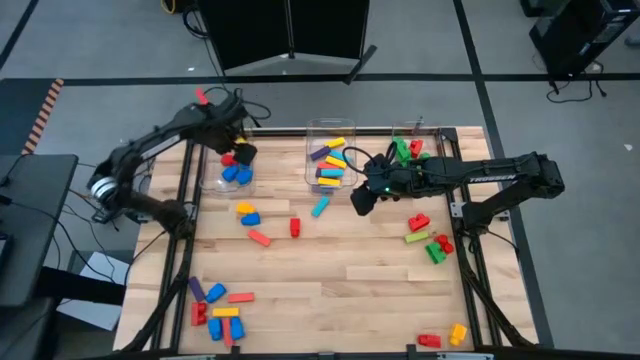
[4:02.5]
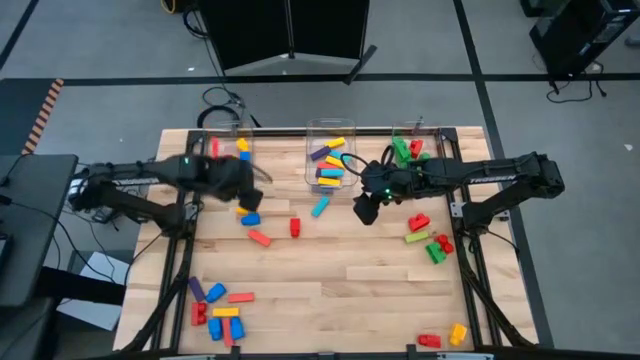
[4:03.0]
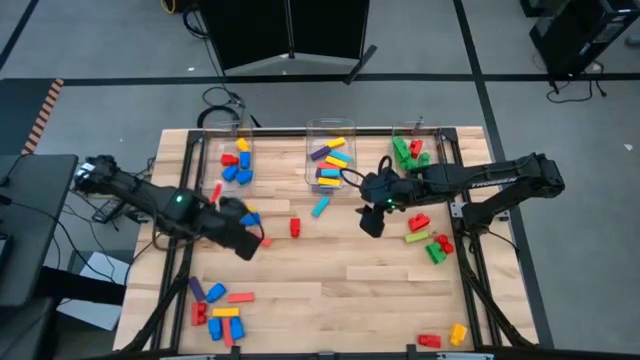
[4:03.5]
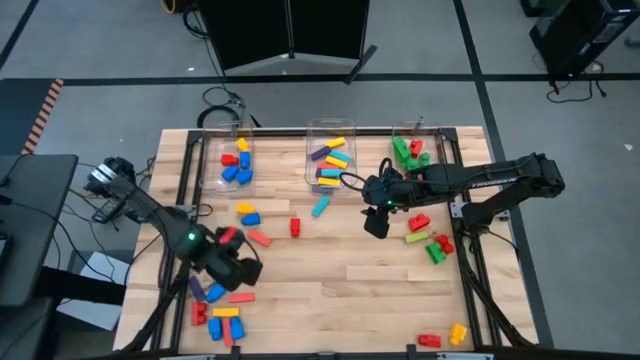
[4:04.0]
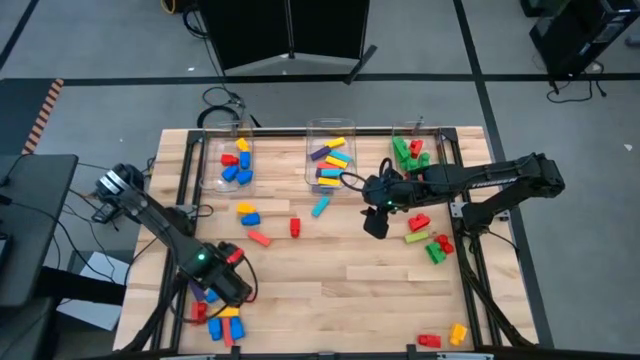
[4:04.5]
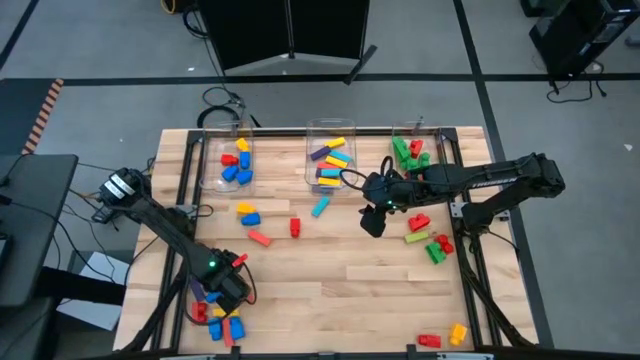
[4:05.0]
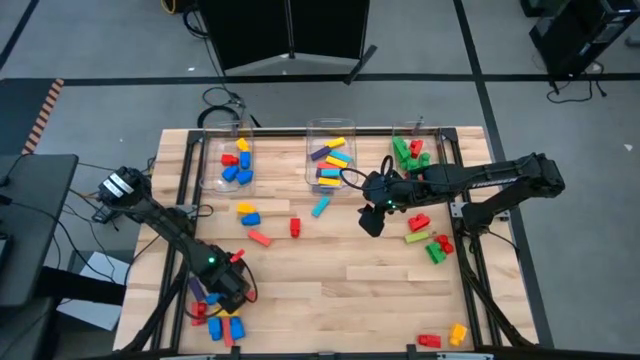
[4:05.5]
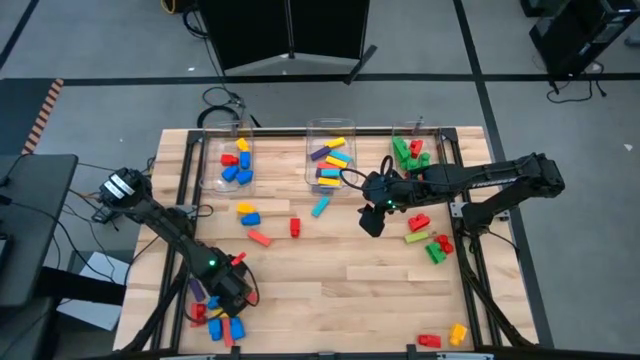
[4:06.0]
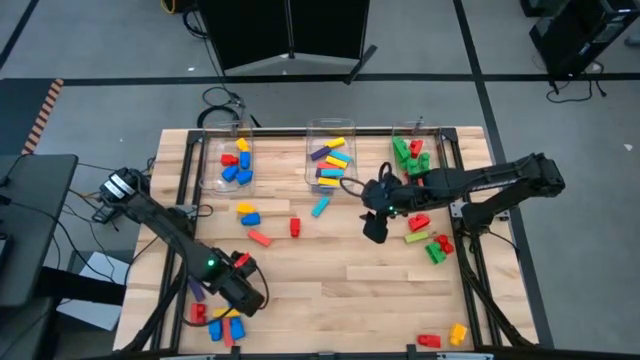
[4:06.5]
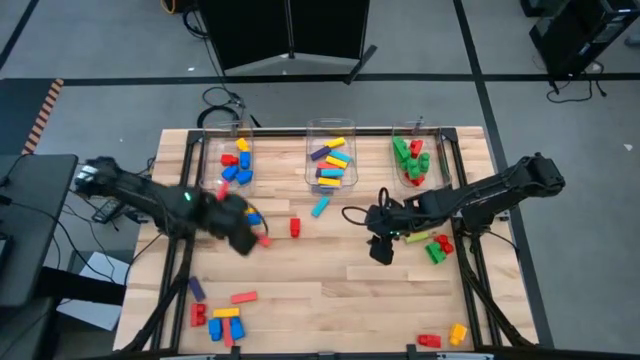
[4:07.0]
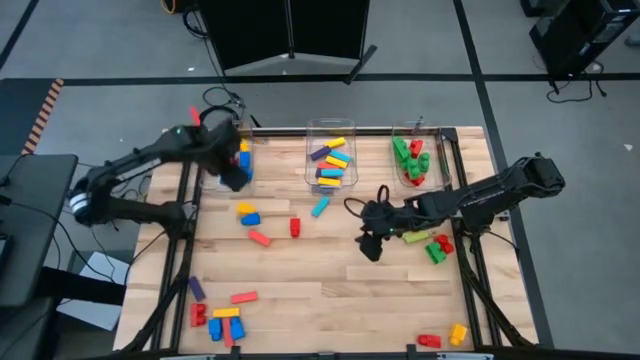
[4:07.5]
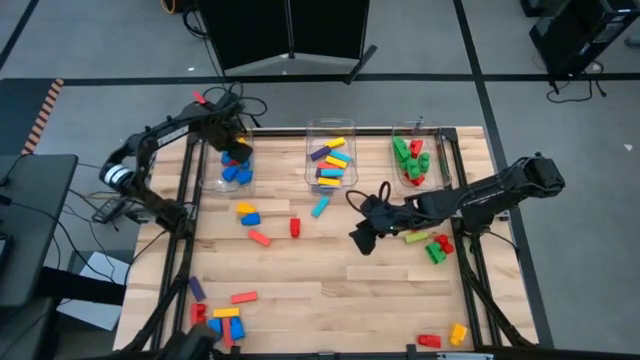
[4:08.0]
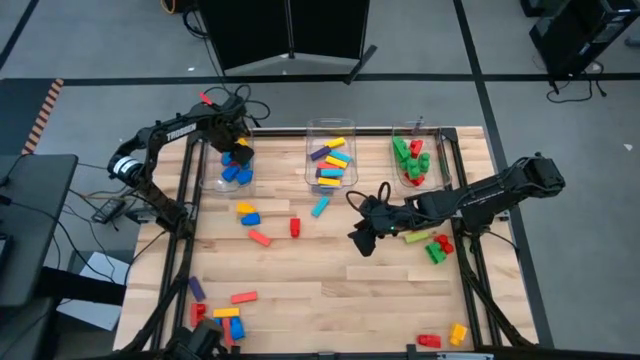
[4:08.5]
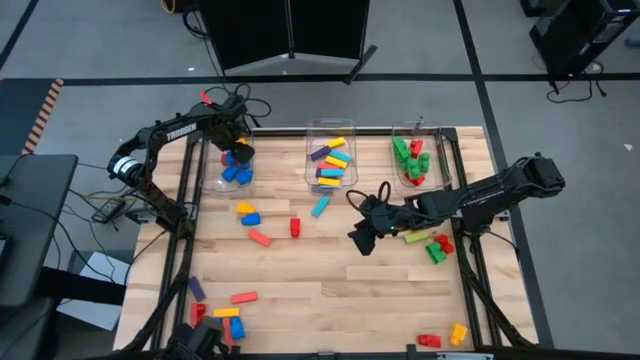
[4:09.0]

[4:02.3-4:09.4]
Task: Sort blocks by size
Put the blue 1 stud game piece into the left transparent bin

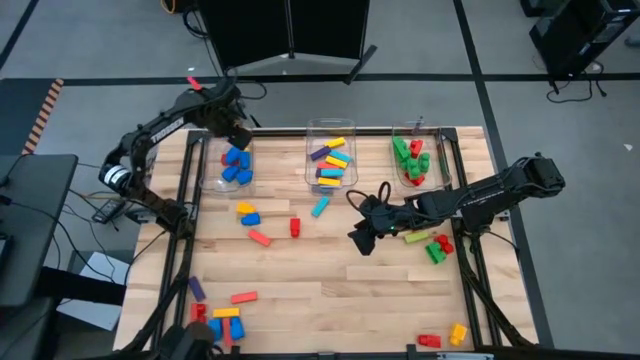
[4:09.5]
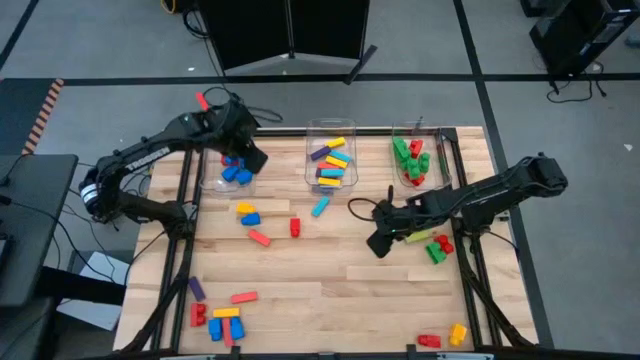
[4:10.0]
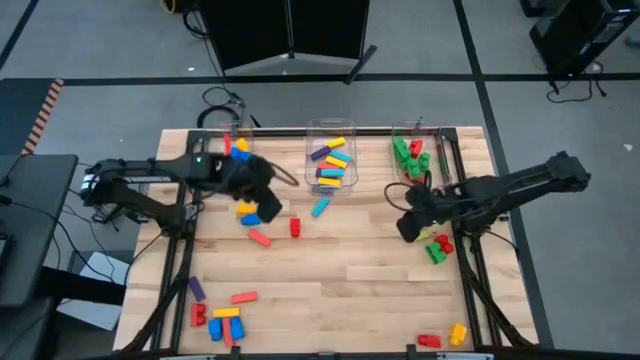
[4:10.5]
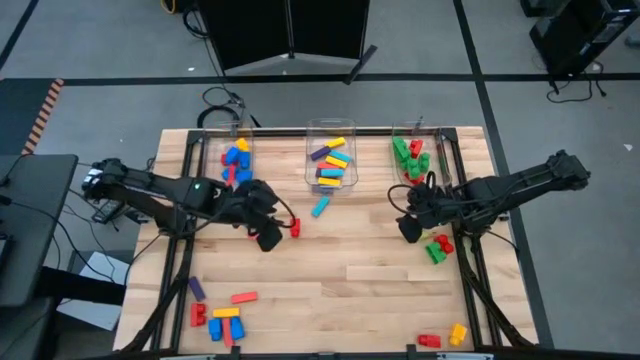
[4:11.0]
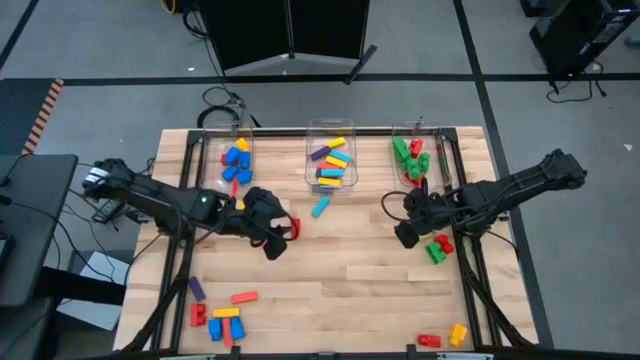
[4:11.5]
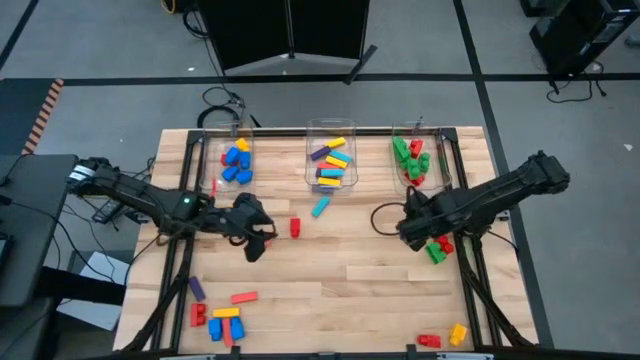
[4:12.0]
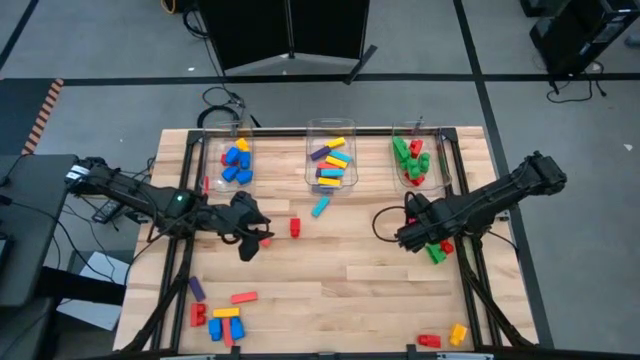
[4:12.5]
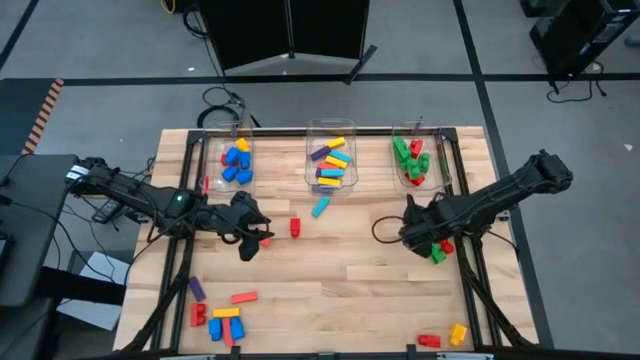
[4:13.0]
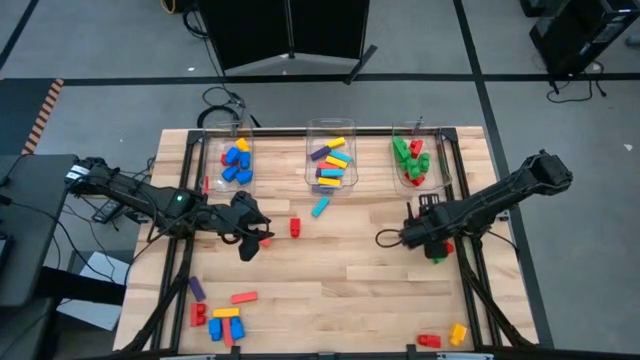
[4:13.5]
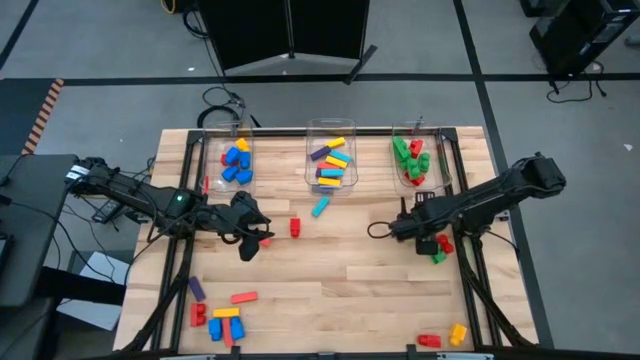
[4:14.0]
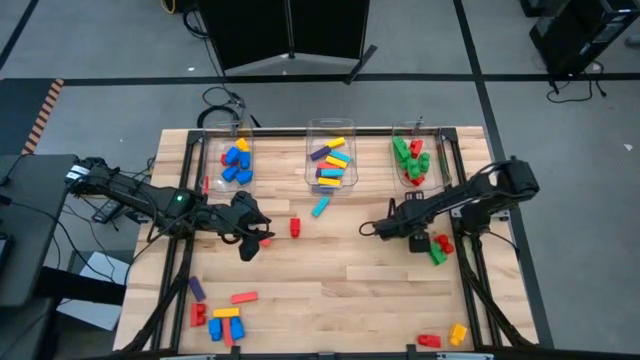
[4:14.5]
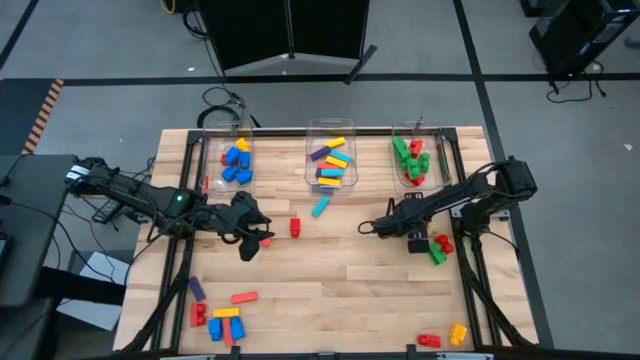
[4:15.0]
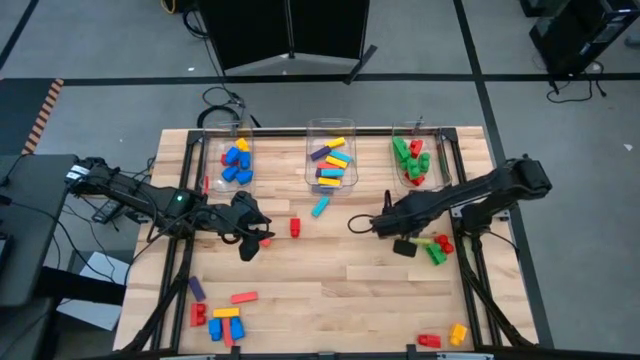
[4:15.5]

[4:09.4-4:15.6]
Put the red 2 stud game piece into the right transparent bin

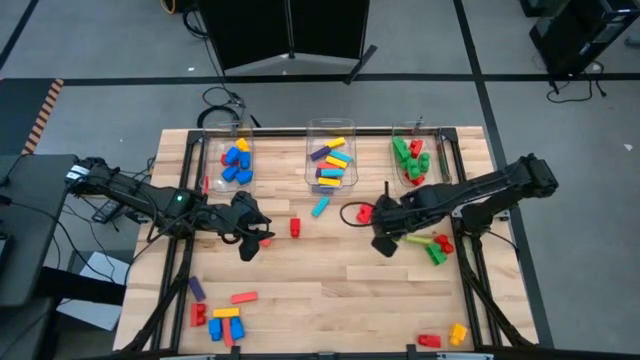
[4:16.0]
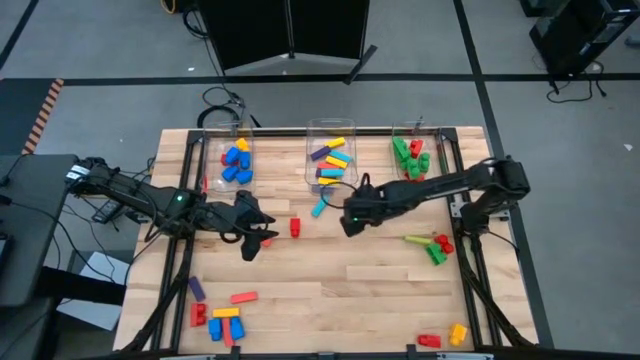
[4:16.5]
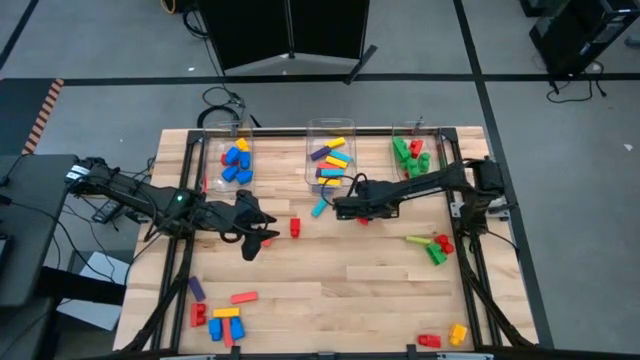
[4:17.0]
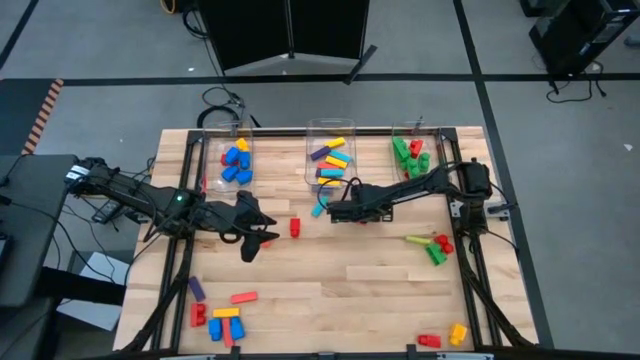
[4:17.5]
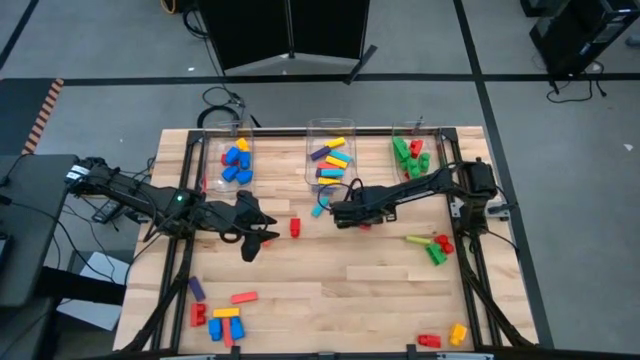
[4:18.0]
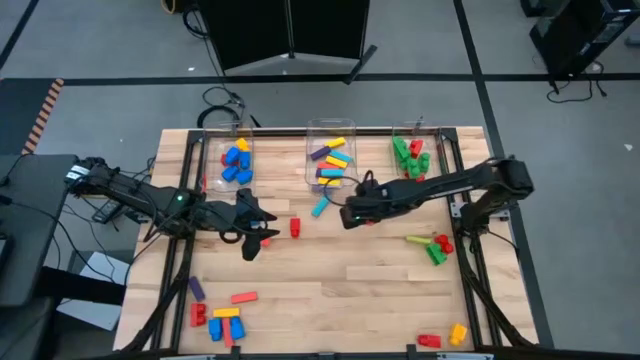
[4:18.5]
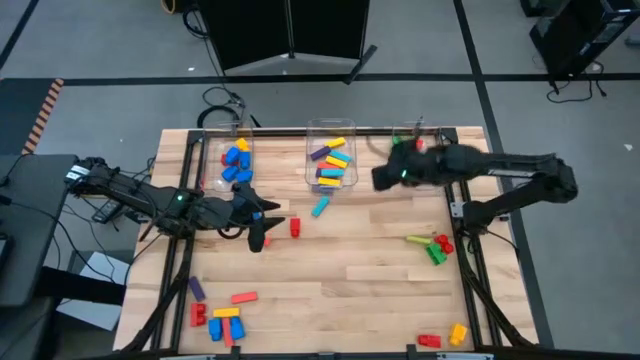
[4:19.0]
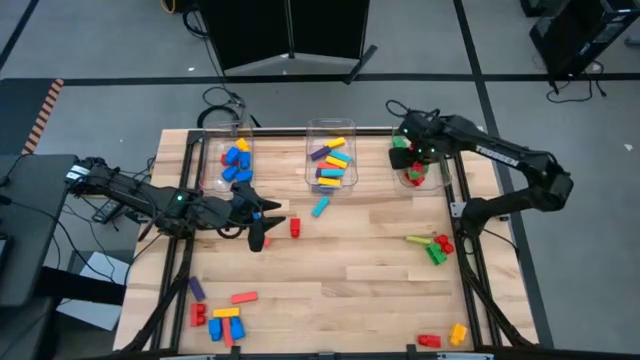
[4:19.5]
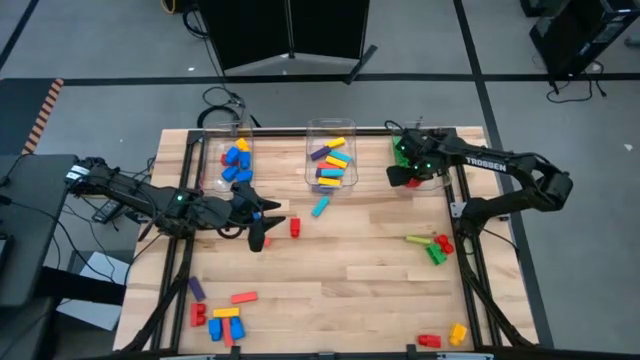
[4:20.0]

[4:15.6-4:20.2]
Put the red 2 stud game piece into the right transparent bin

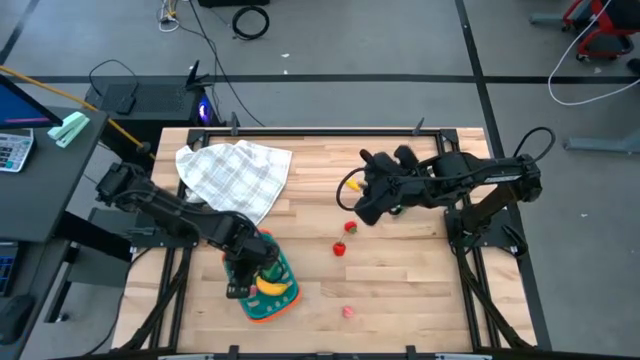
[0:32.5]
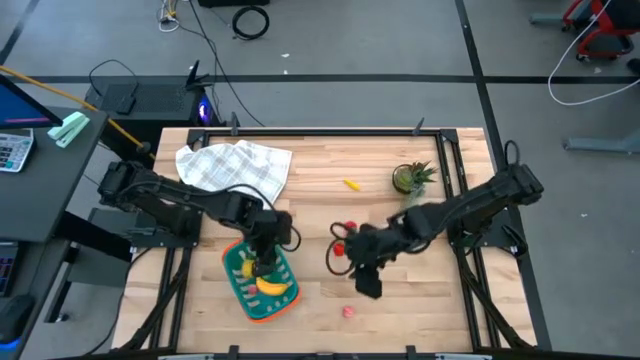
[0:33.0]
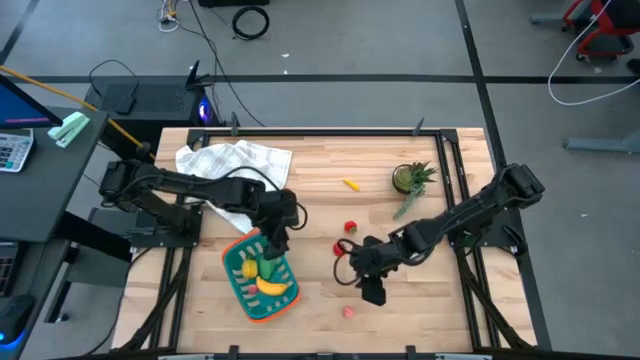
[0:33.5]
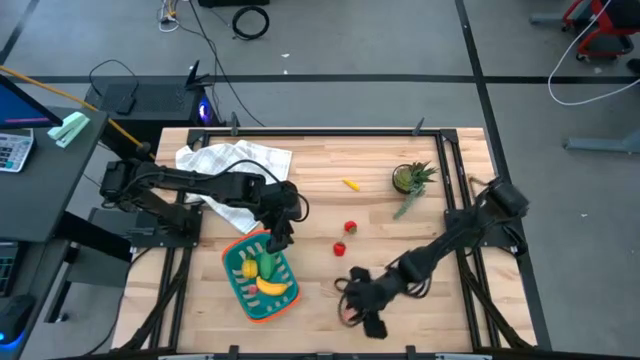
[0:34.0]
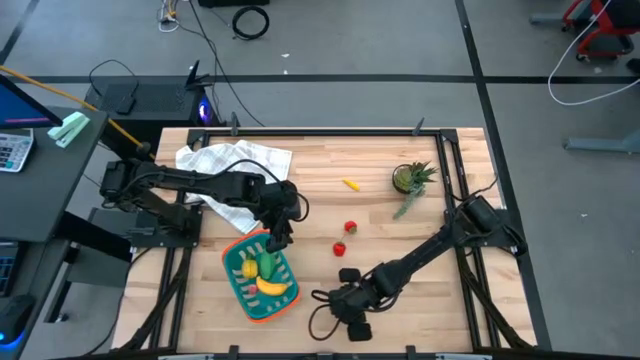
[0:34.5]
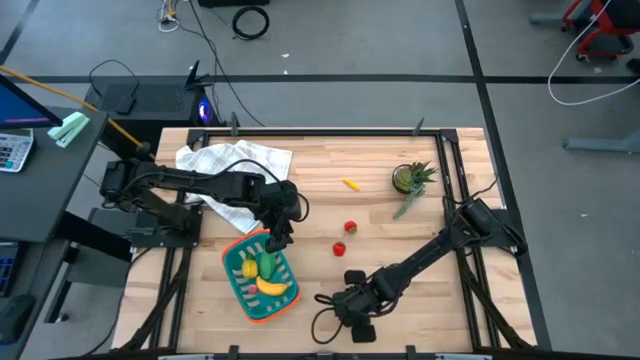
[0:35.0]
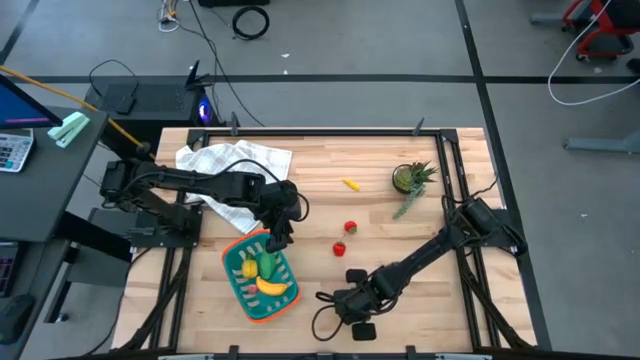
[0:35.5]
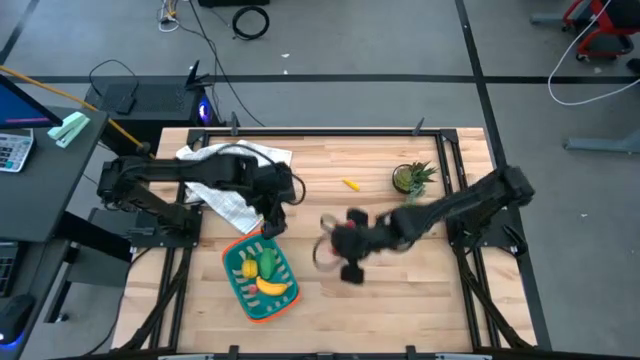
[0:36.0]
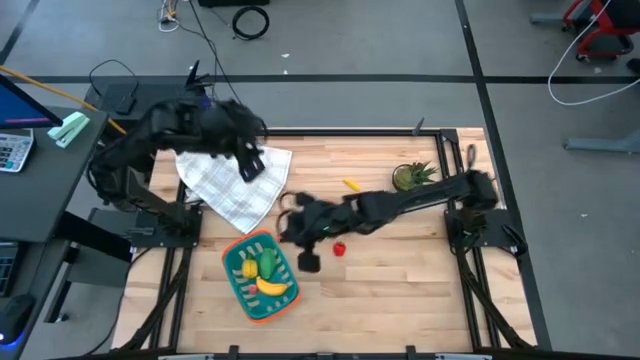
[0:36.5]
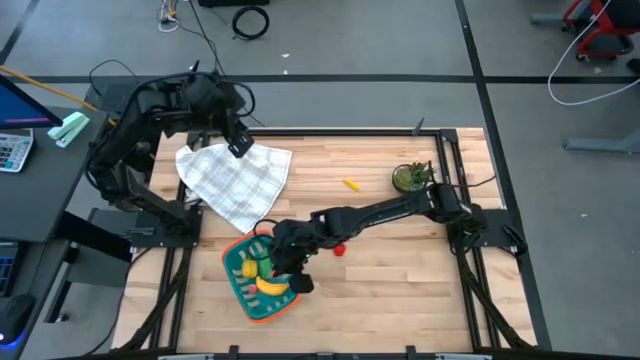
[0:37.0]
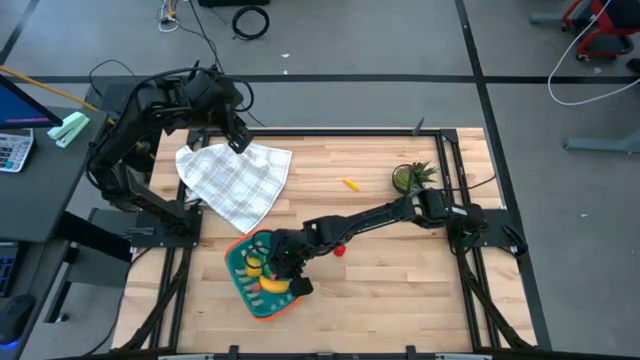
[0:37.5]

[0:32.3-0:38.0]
Task: Pick and placing Produce into tupperware
Put the pink peach into the blue basket
